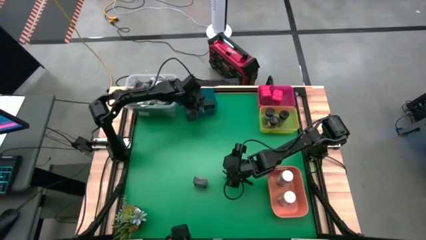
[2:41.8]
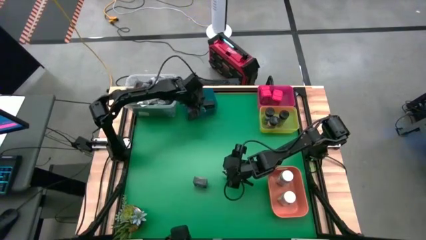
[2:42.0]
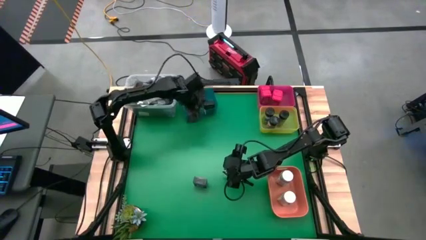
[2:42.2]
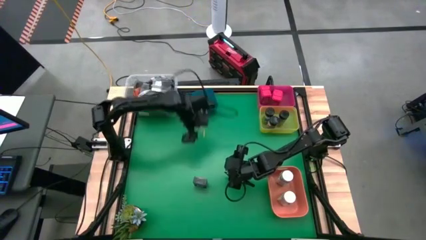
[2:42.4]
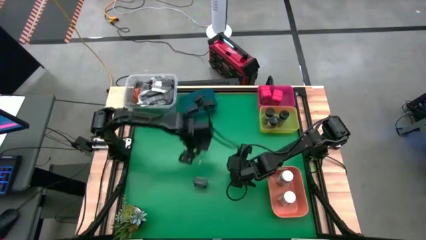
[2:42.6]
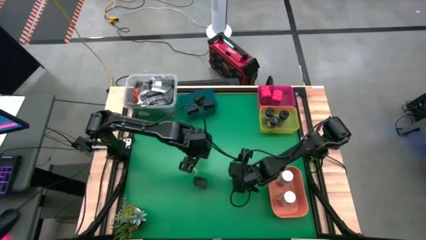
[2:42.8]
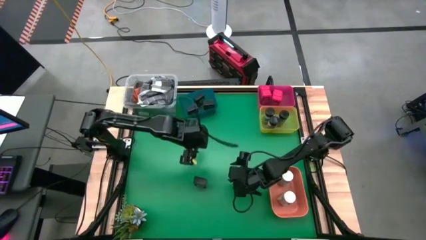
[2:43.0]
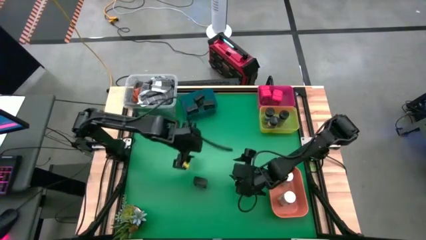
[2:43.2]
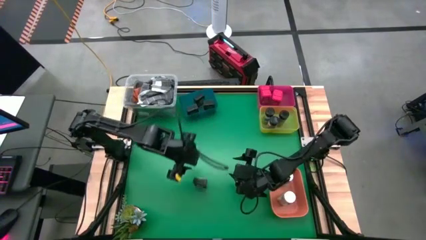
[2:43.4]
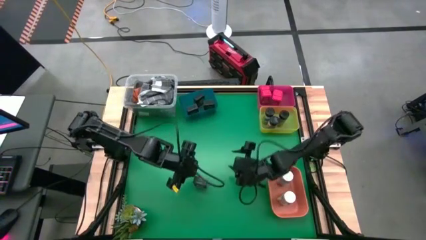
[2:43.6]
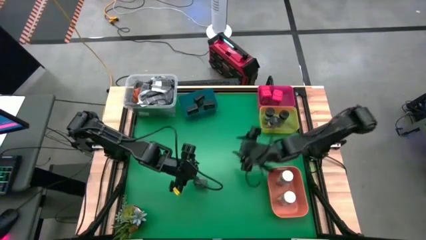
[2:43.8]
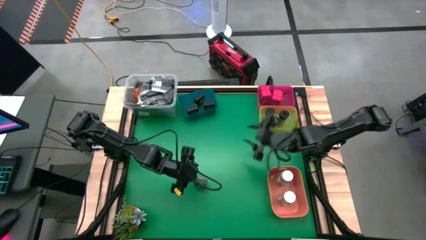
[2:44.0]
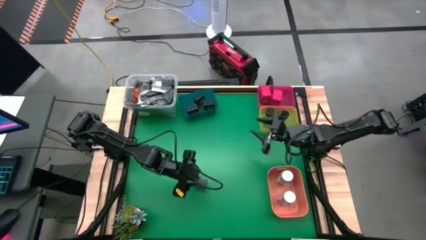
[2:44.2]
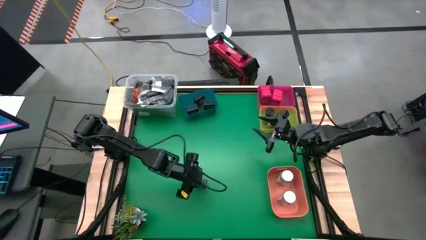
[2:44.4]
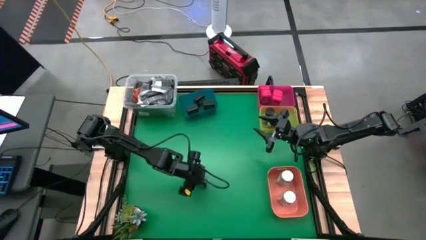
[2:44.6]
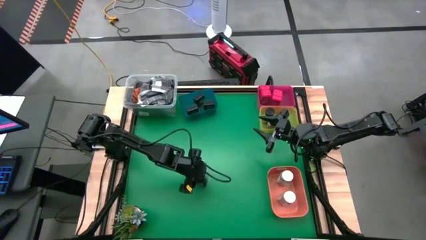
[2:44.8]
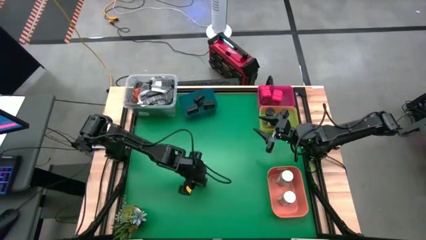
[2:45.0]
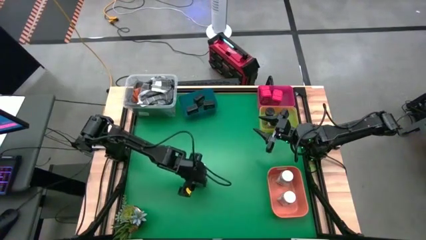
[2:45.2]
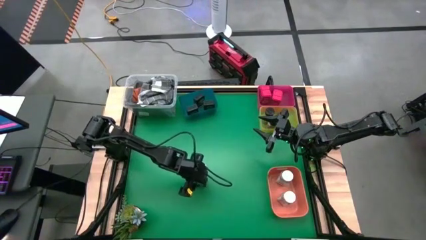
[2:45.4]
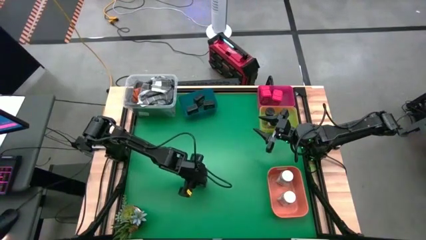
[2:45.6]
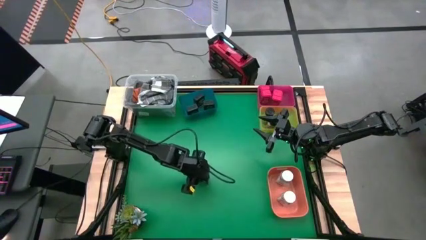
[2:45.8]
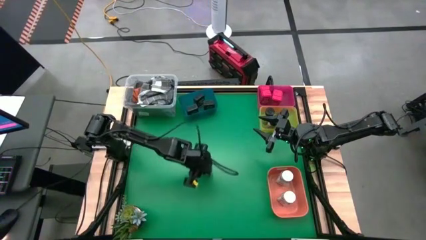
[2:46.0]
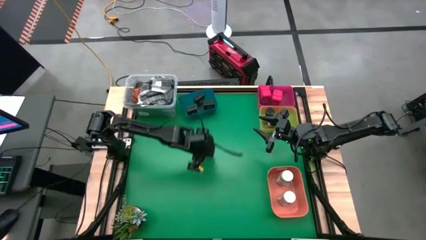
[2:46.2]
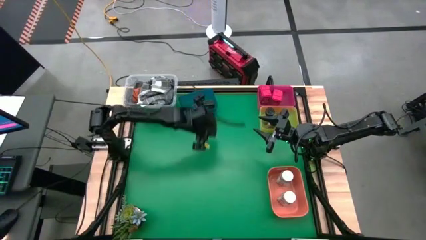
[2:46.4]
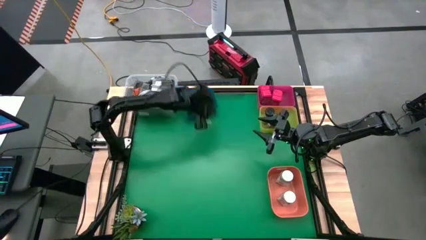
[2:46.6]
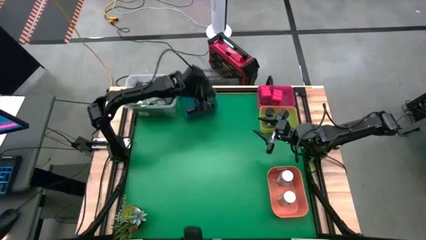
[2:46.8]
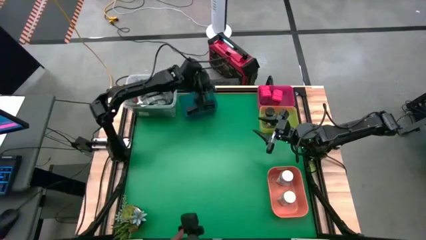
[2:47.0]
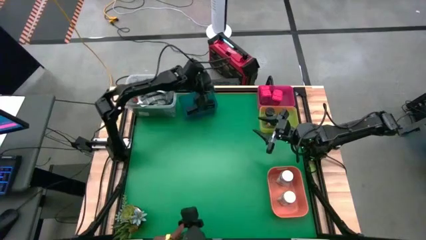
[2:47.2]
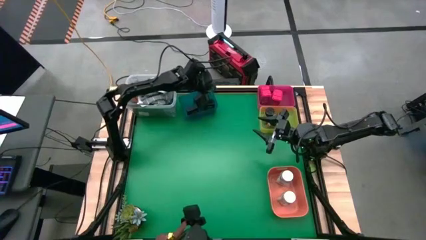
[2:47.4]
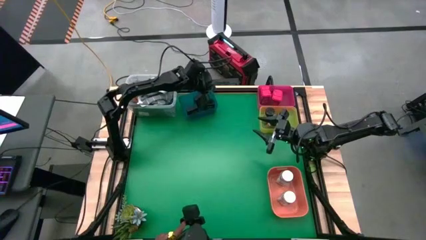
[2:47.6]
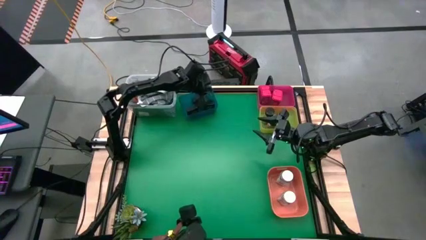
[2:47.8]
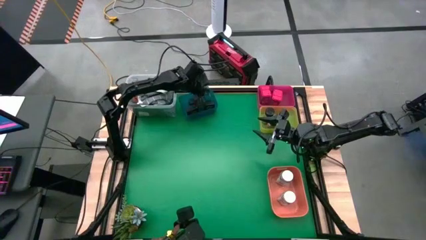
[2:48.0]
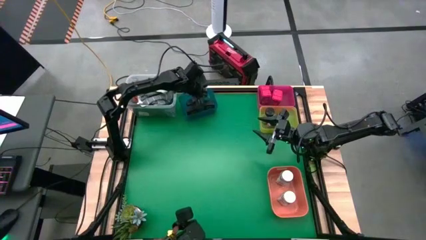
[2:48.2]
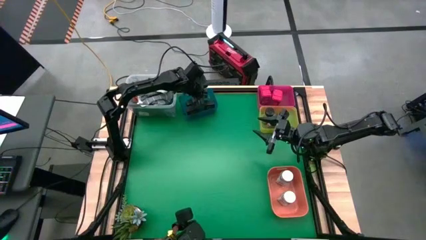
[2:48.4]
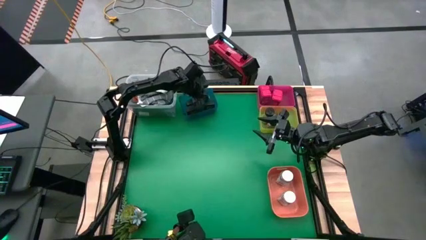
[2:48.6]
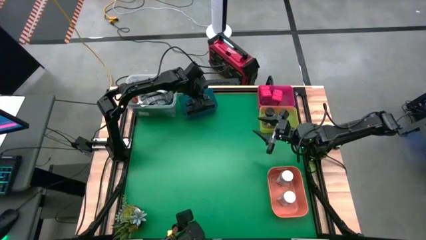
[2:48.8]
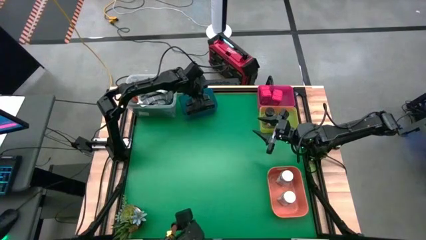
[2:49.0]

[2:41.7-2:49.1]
Task: Sort spices by type
Put the black seasoning from the middle into the orange bin

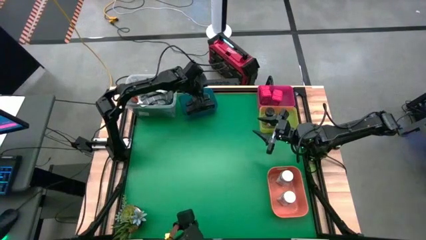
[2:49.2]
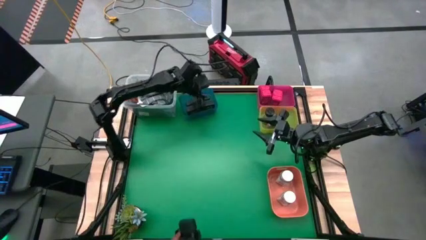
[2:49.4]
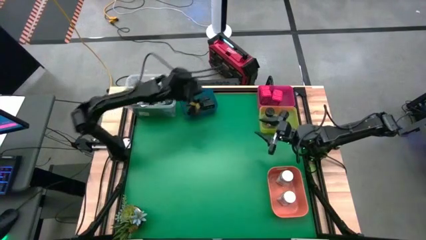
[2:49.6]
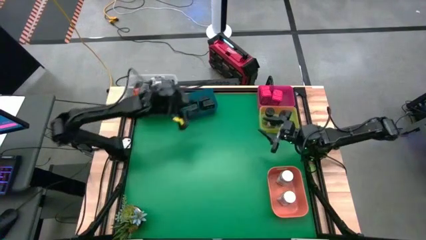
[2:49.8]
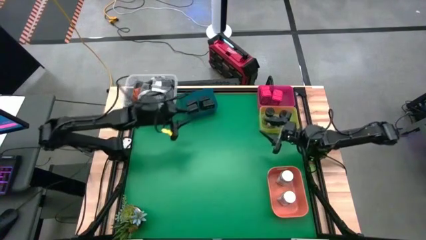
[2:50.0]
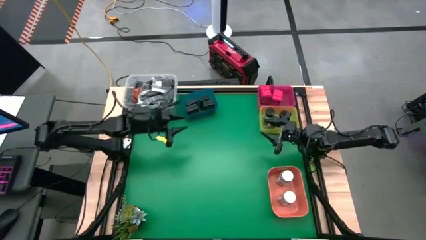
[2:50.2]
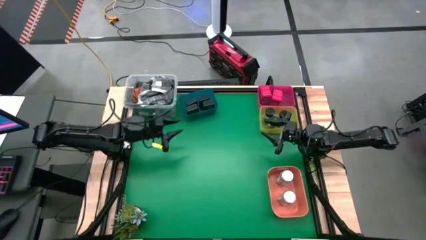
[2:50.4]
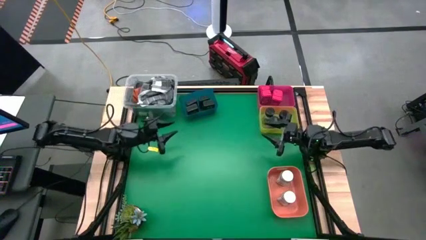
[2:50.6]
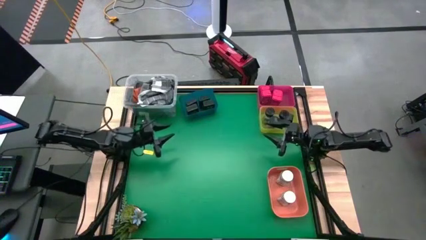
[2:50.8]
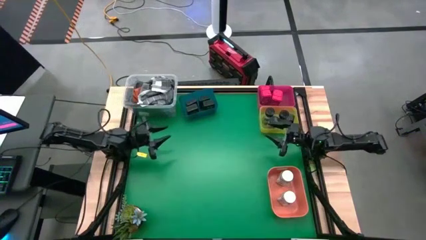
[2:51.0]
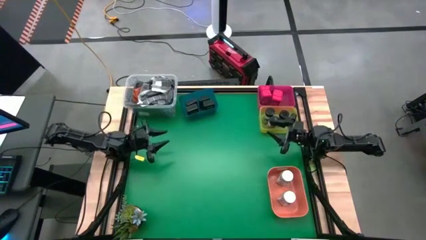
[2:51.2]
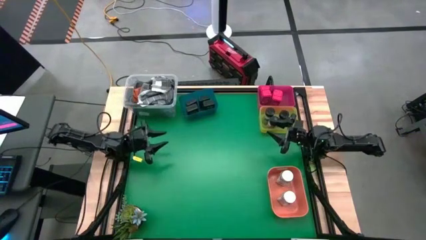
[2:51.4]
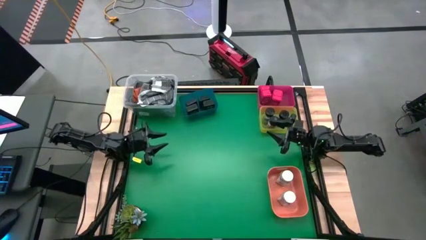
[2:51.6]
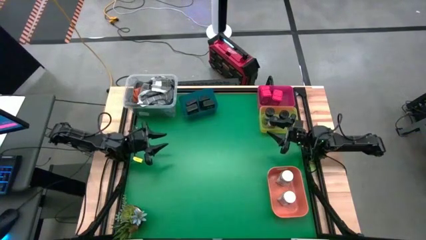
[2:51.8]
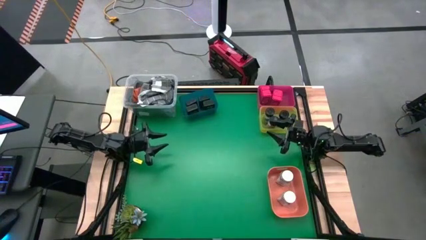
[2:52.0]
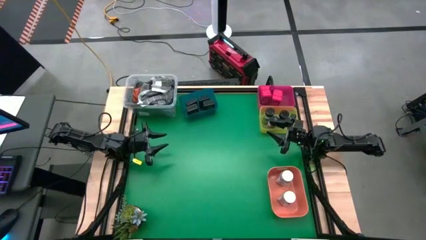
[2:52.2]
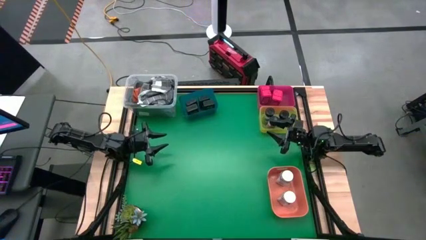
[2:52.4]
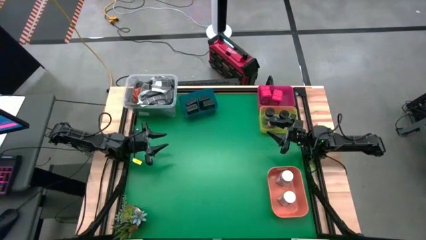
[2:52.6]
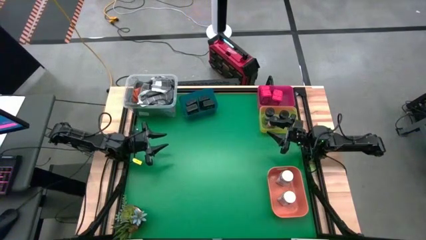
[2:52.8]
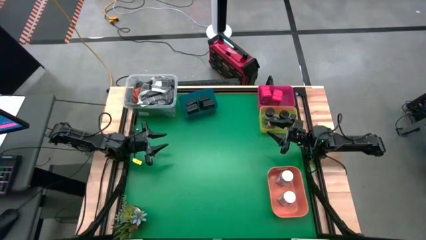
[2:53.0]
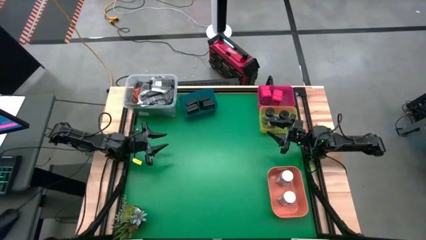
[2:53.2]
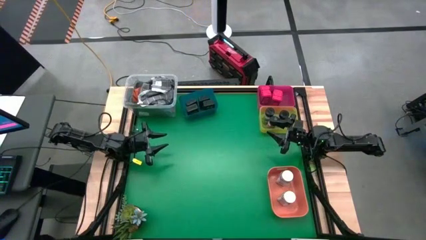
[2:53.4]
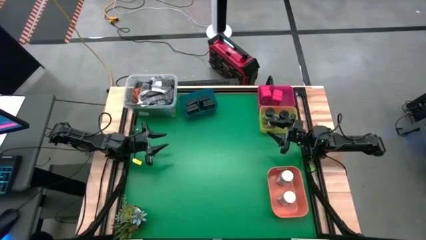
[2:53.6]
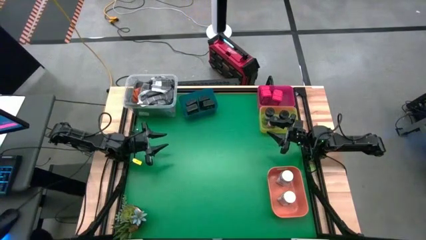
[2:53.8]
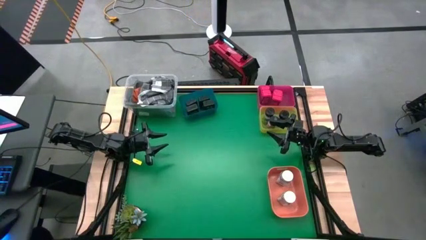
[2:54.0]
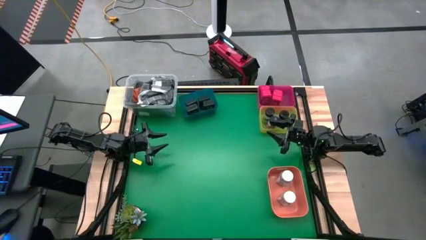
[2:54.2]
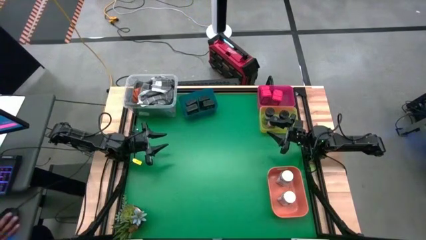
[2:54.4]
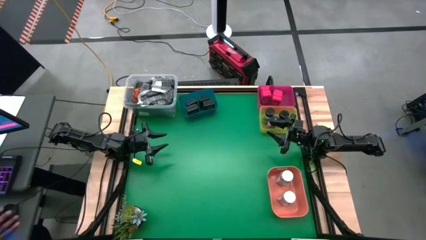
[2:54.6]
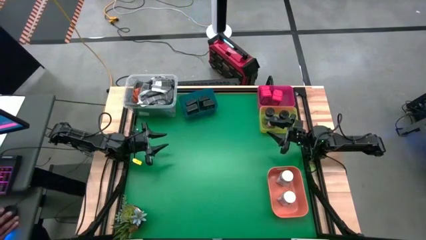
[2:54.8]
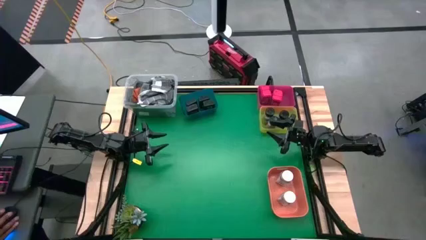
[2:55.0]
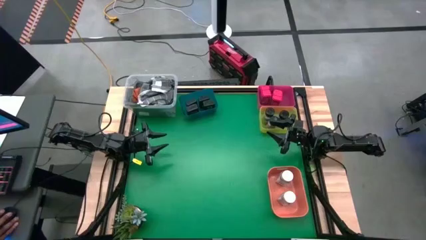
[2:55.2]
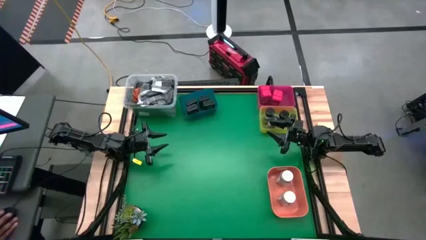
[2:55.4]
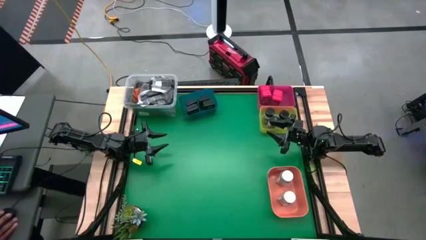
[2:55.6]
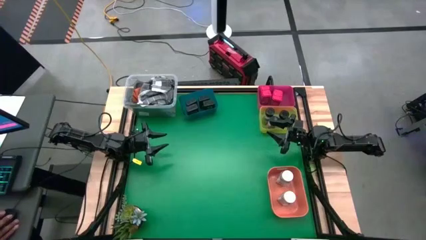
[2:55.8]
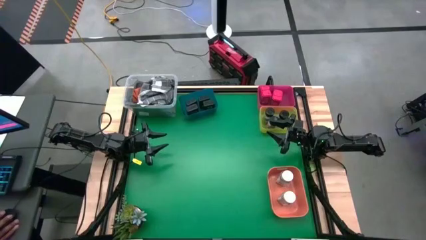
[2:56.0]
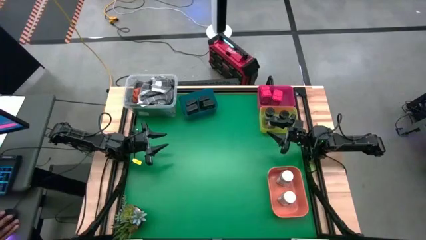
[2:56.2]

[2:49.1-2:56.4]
Return to Home Position
